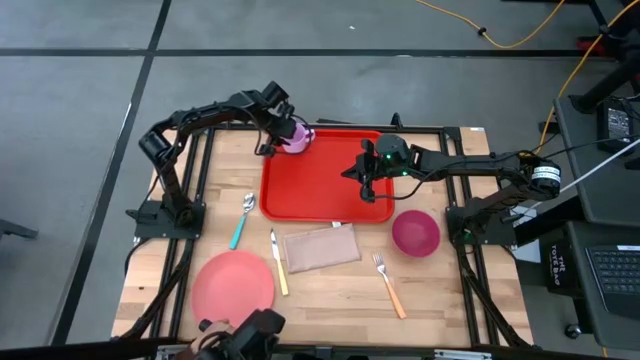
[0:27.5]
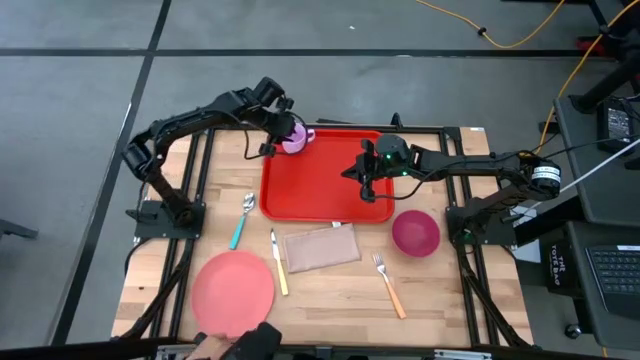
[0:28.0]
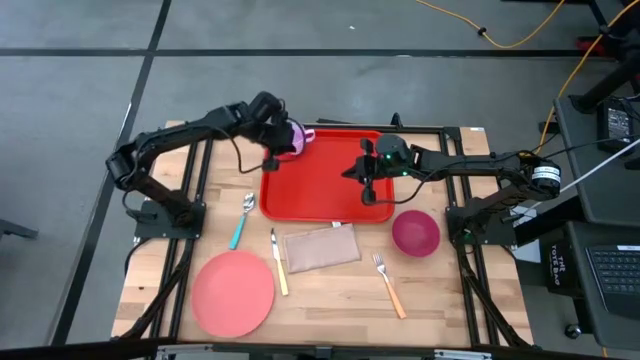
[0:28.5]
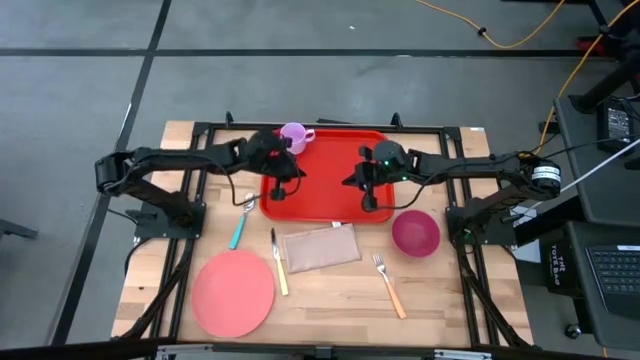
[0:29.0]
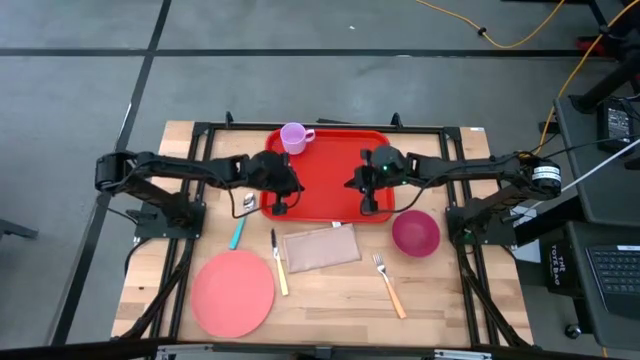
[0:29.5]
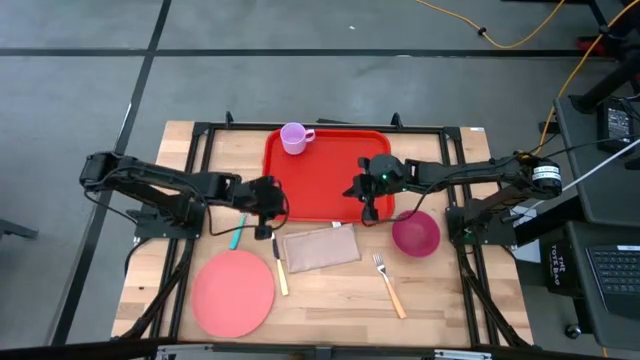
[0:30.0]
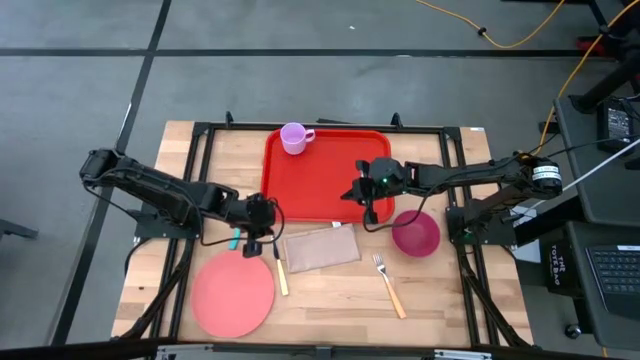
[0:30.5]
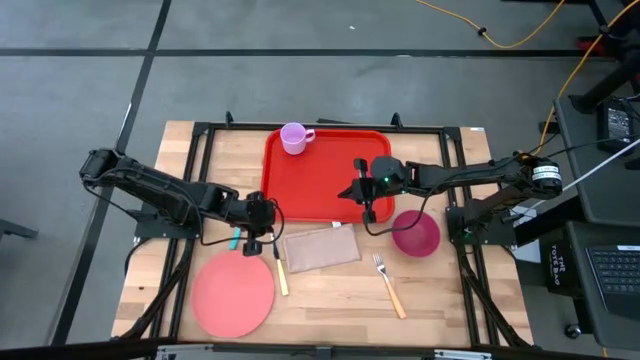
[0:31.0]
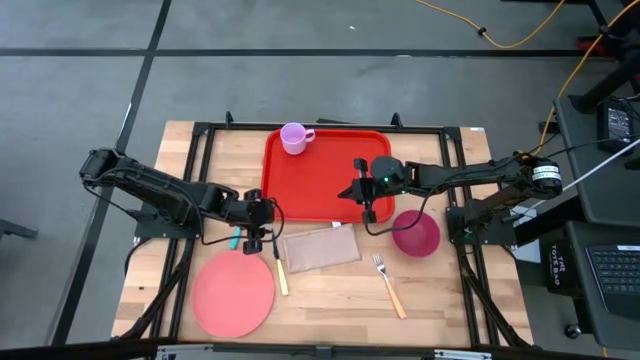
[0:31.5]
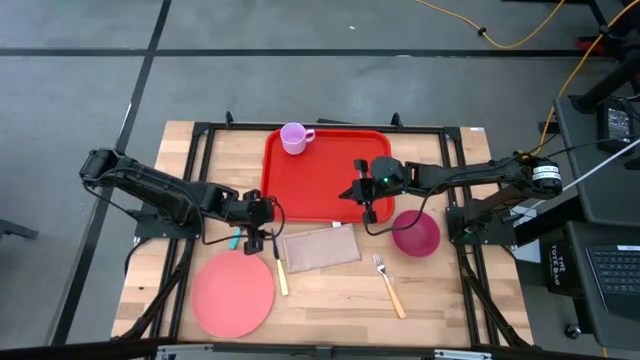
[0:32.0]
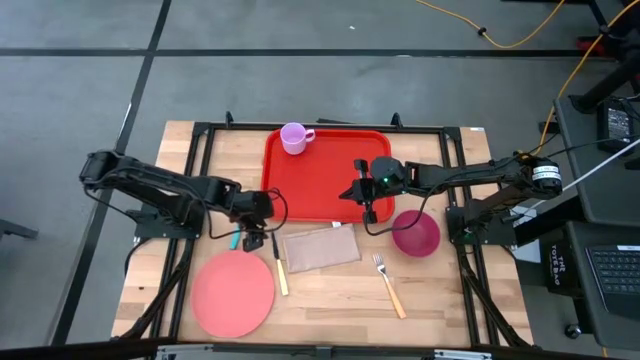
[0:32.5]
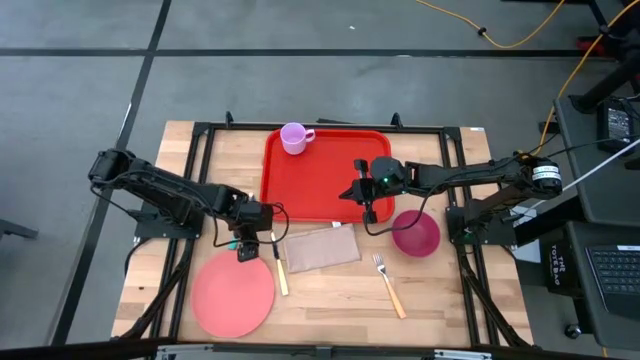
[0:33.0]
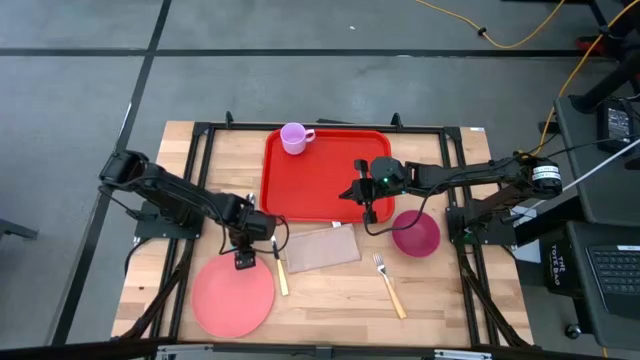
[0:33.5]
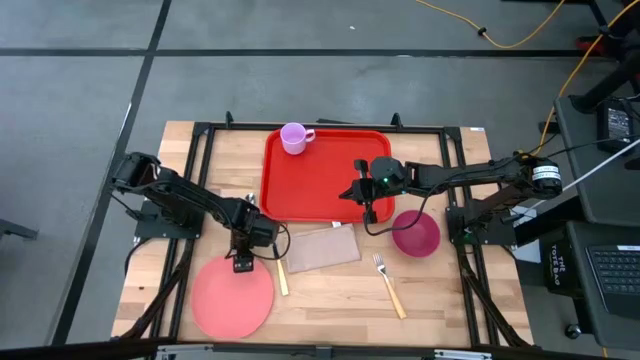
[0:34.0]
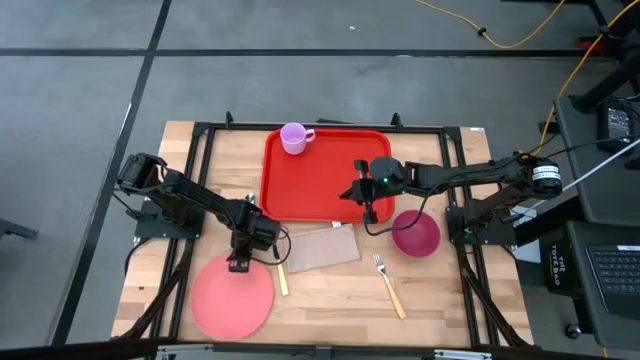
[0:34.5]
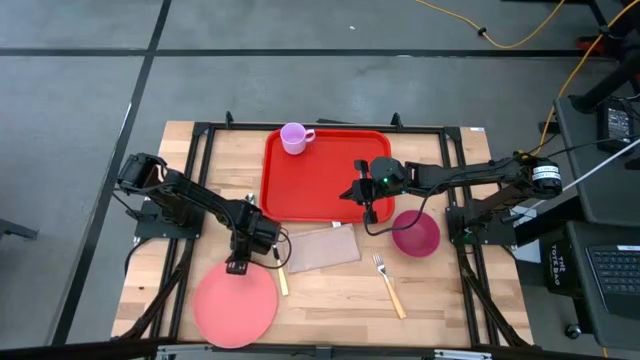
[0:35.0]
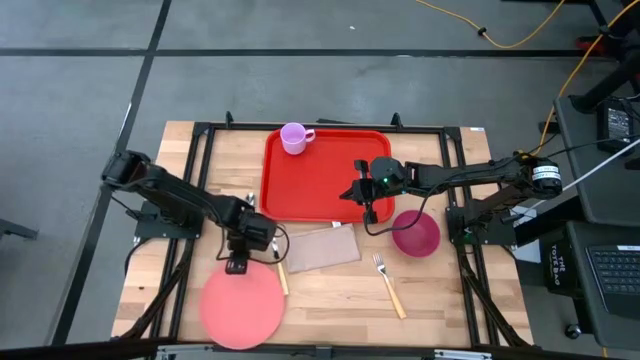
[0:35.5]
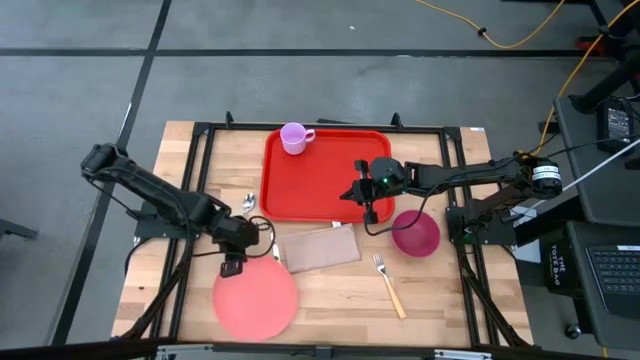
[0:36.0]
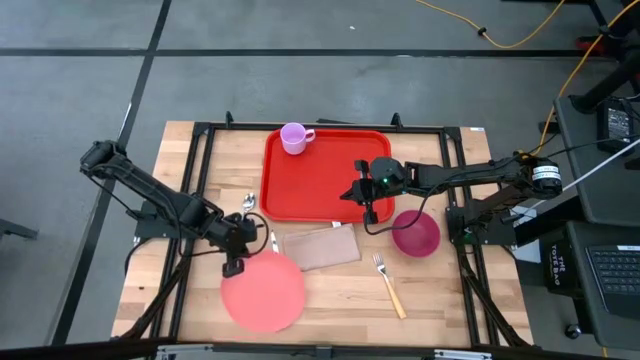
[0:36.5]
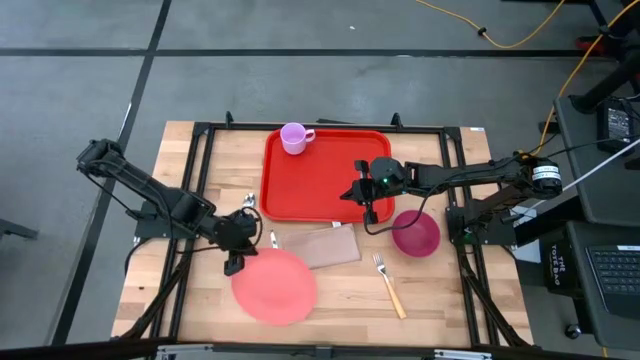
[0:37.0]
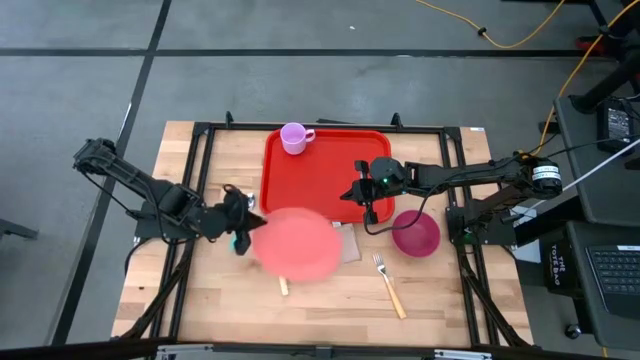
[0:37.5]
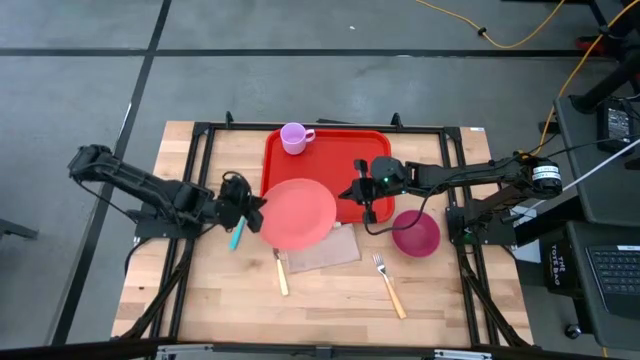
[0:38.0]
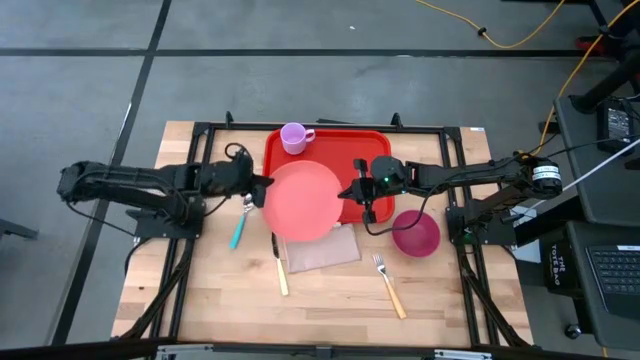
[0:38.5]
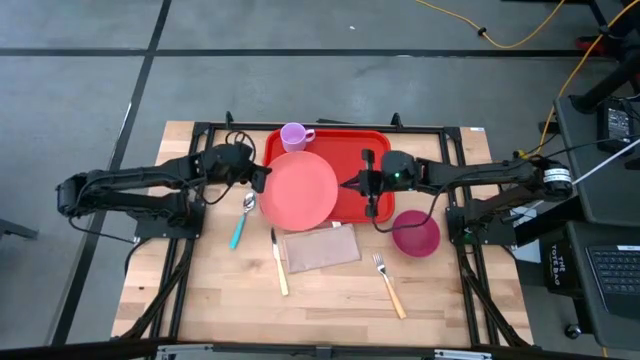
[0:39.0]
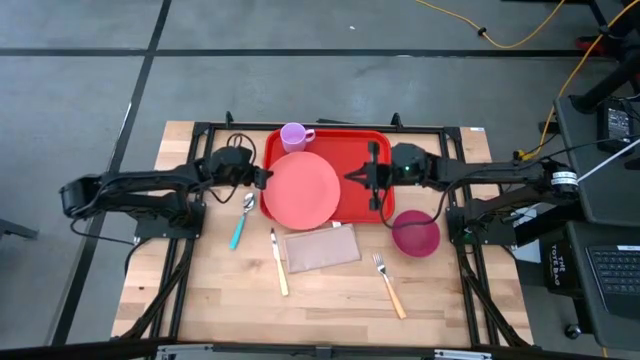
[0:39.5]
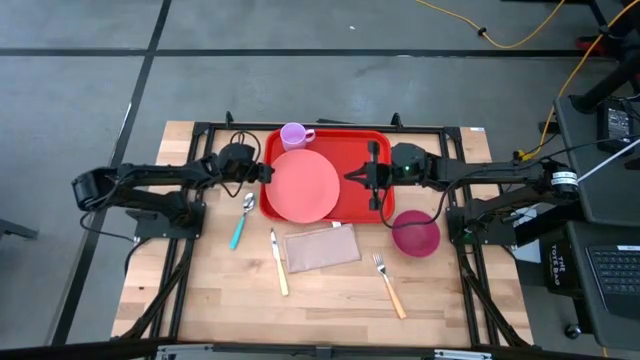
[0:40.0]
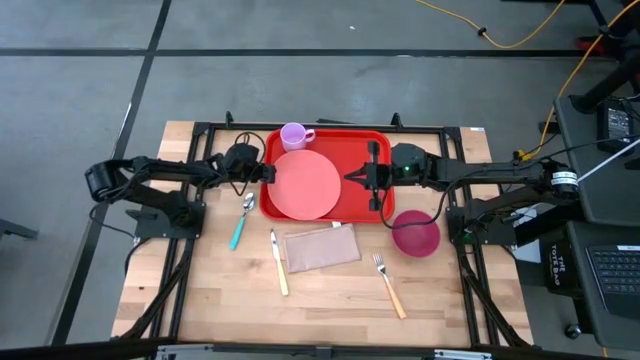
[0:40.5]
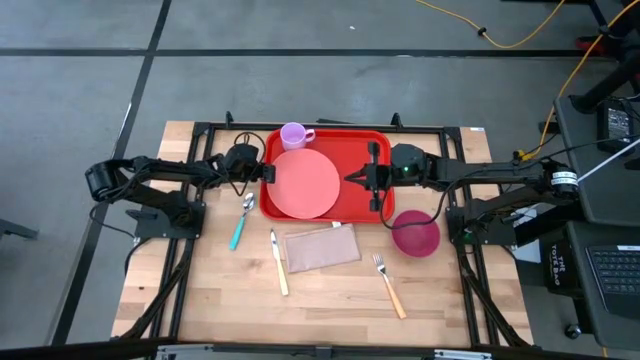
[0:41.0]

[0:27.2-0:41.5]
Task: Set up tray
Put the pink plate on the red serving tray to the bottom of the purple mug

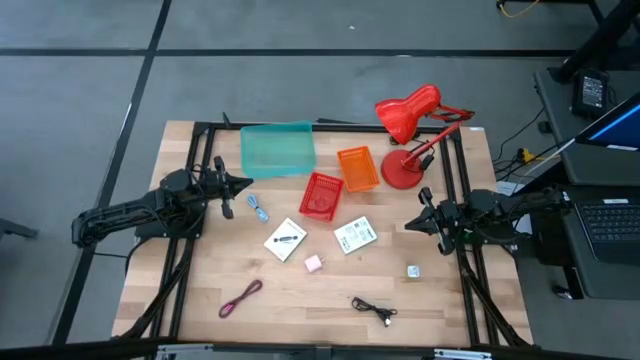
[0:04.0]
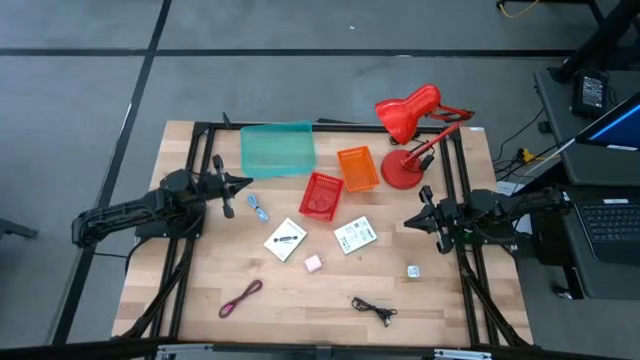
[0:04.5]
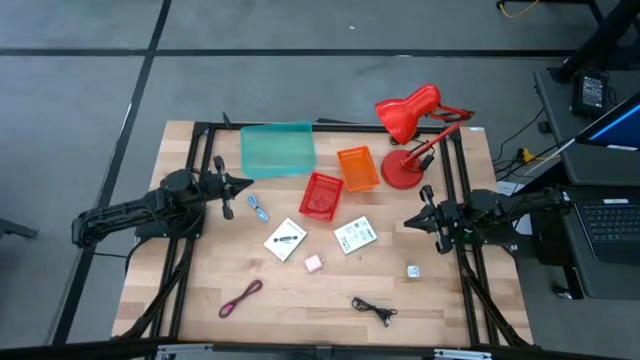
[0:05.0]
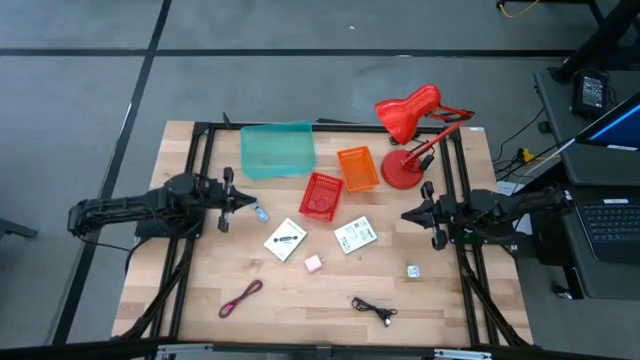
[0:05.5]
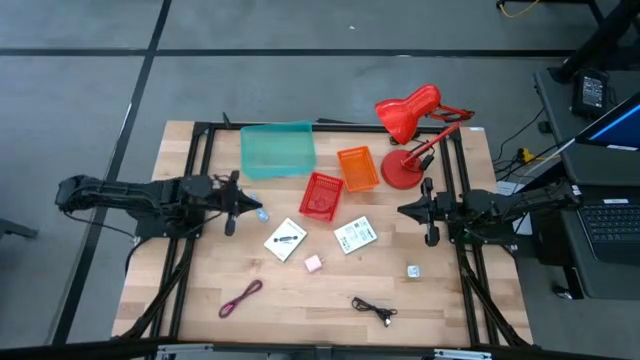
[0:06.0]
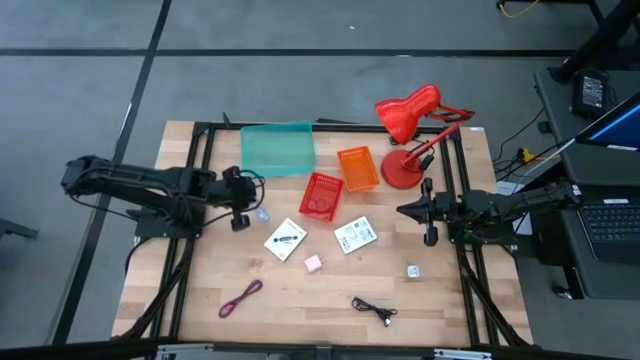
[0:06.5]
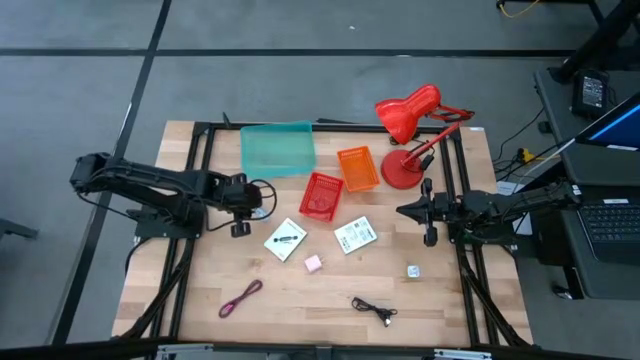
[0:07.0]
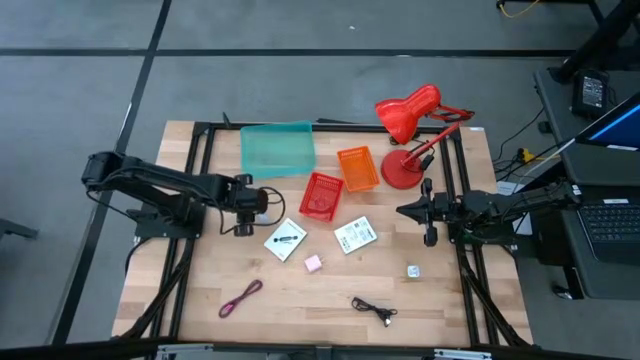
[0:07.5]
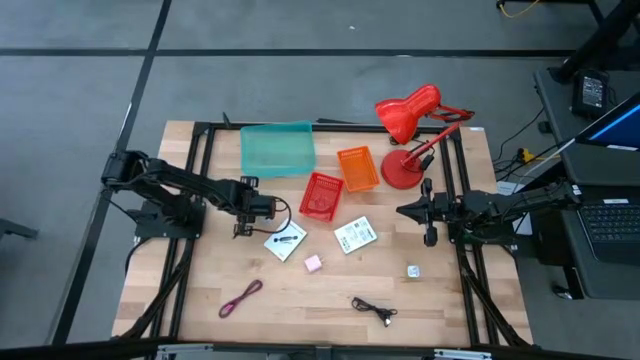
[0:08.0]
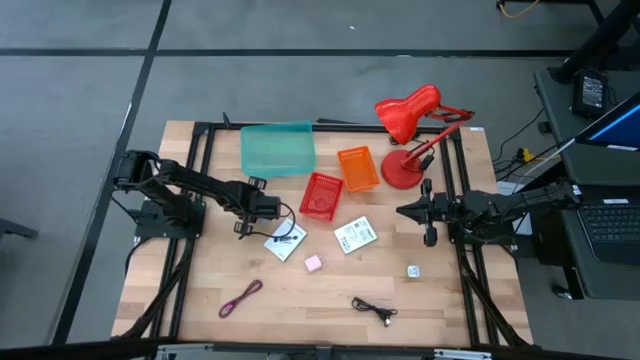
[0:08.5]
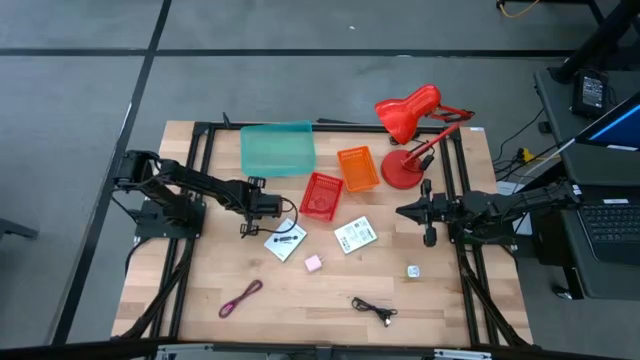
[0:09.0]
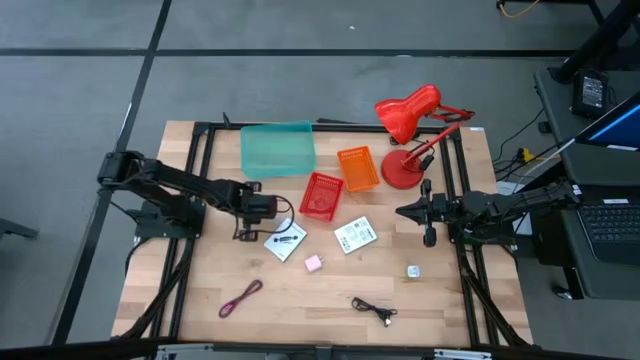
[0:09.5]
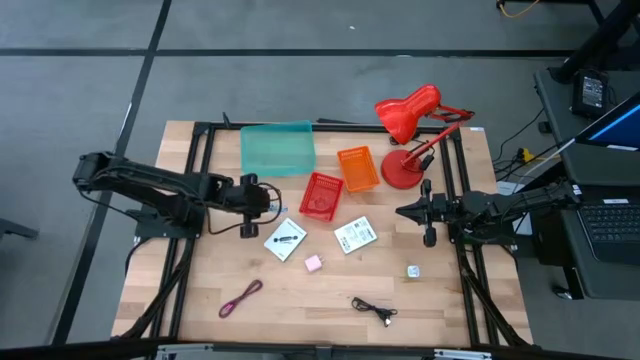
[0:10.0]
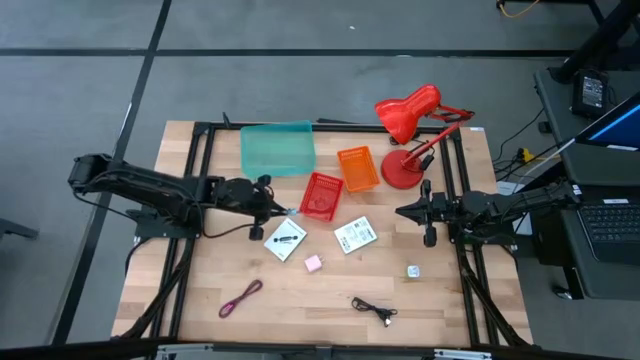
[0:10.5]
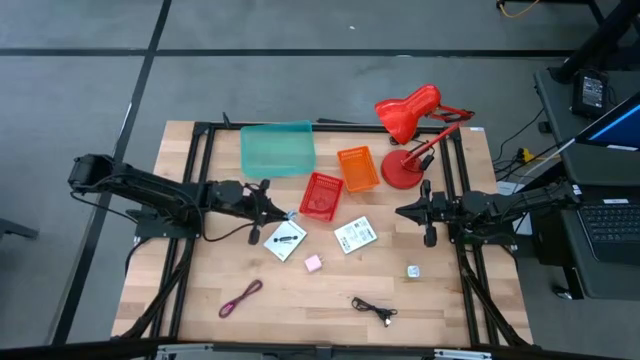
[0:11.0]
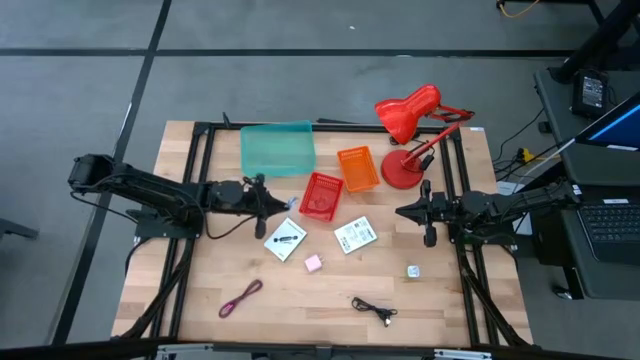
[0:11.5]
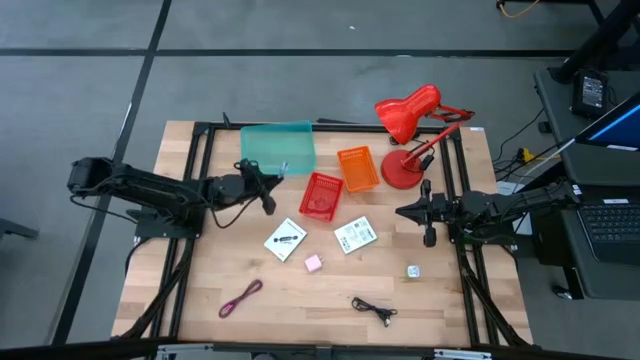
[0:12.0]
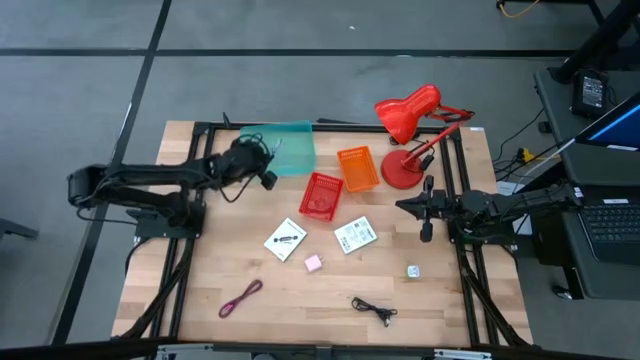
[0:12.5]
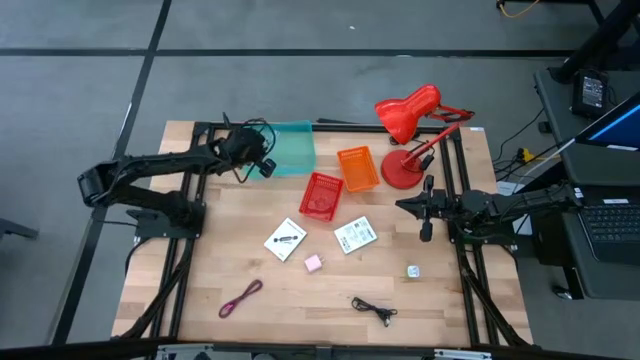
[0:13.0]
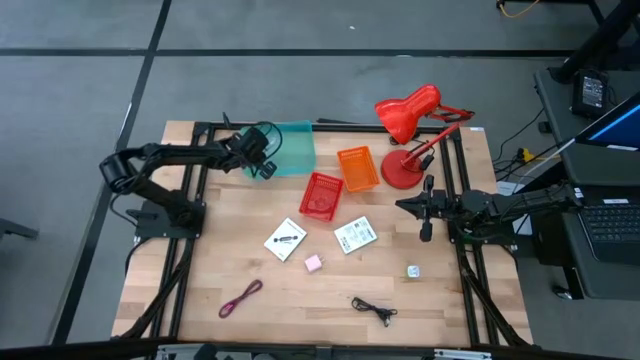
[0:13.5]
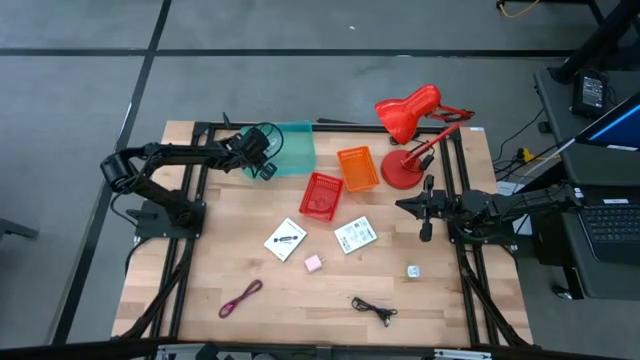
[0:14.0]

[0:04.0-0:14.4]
Task: Pick and place items into bin
Put the blue charger cable into the blue bin
